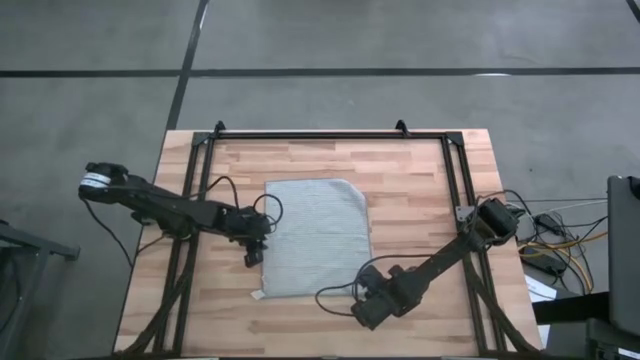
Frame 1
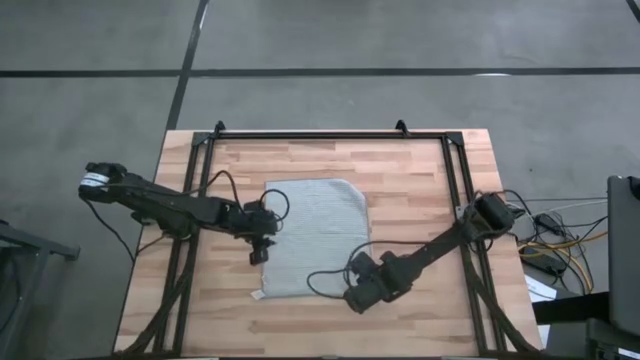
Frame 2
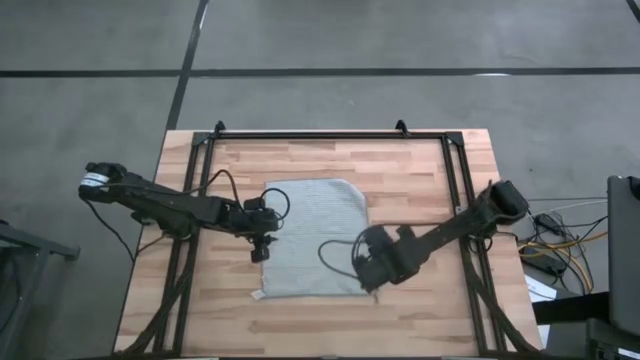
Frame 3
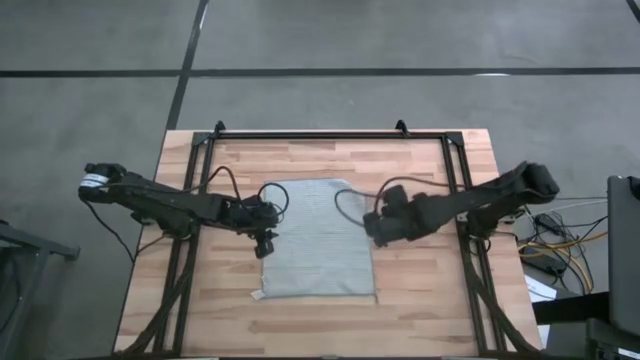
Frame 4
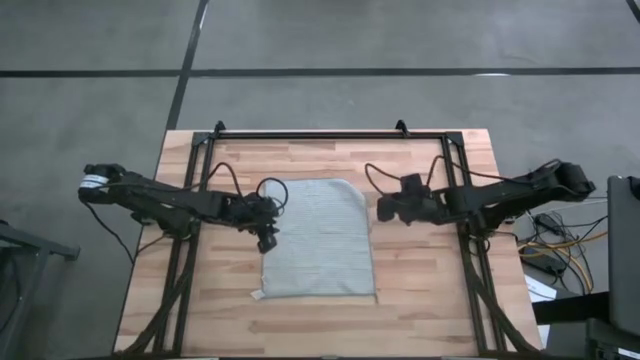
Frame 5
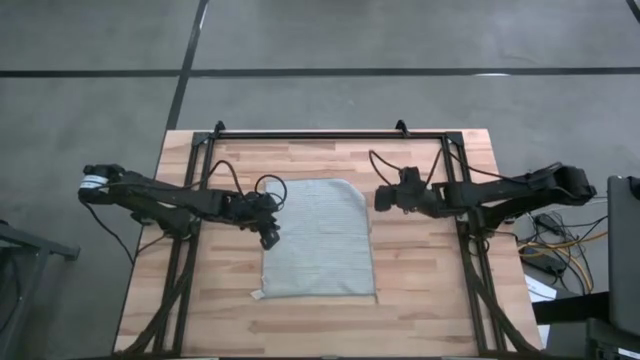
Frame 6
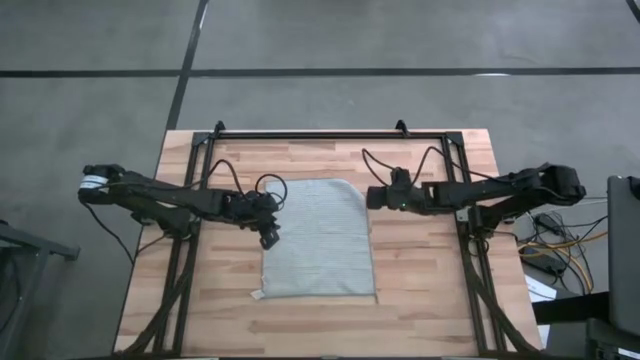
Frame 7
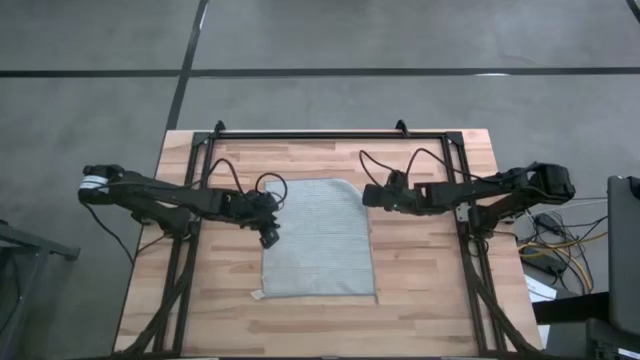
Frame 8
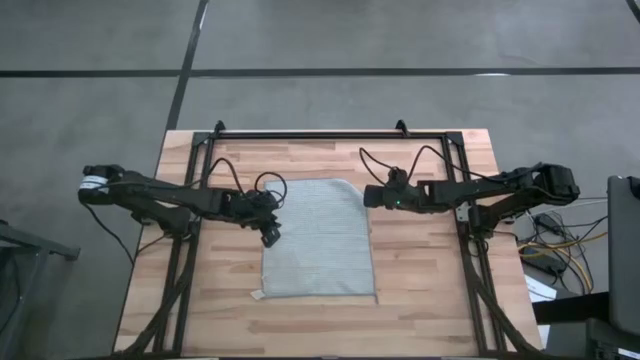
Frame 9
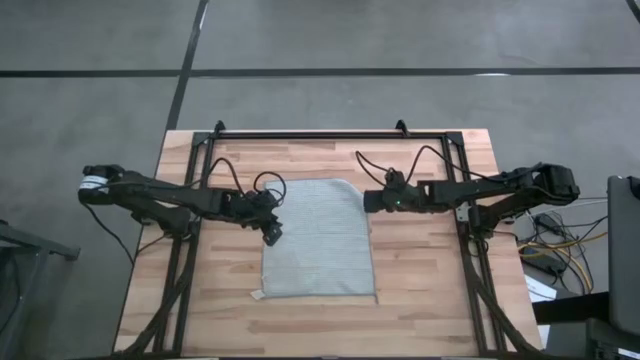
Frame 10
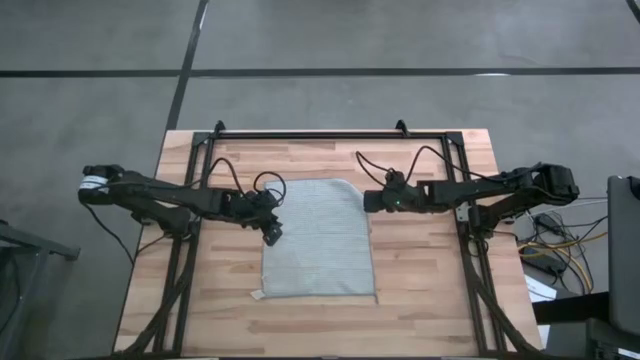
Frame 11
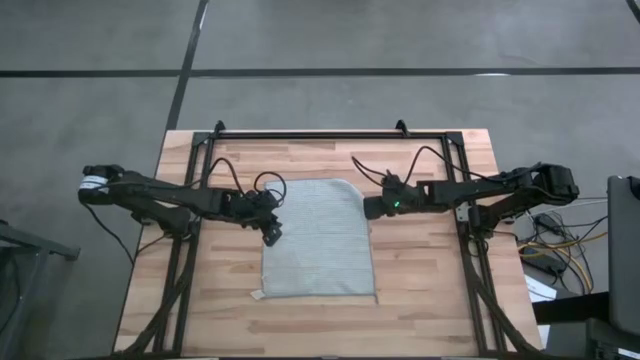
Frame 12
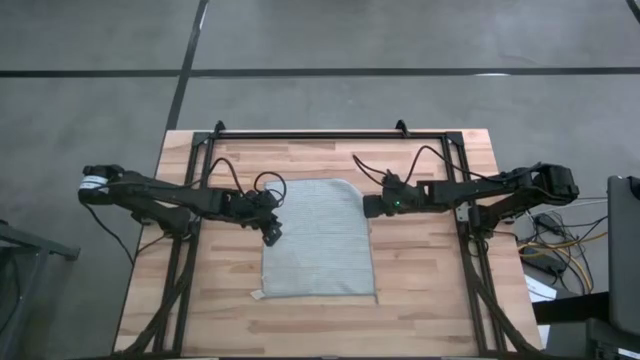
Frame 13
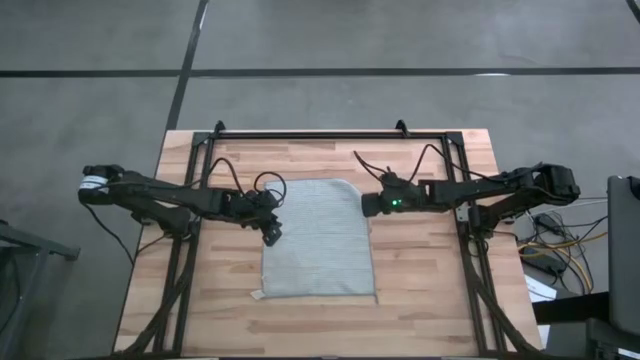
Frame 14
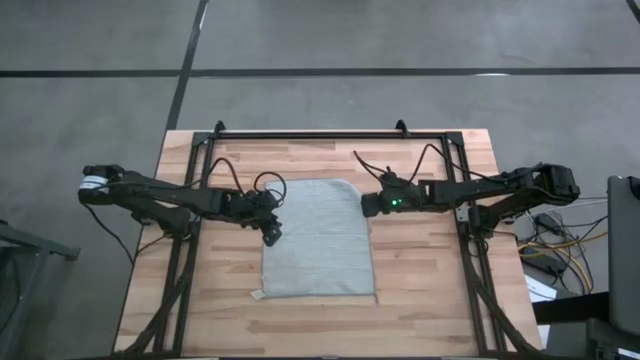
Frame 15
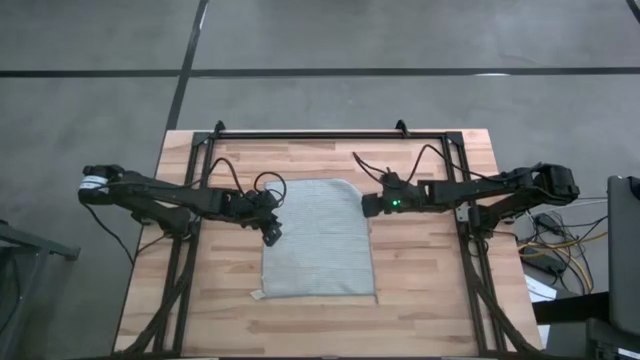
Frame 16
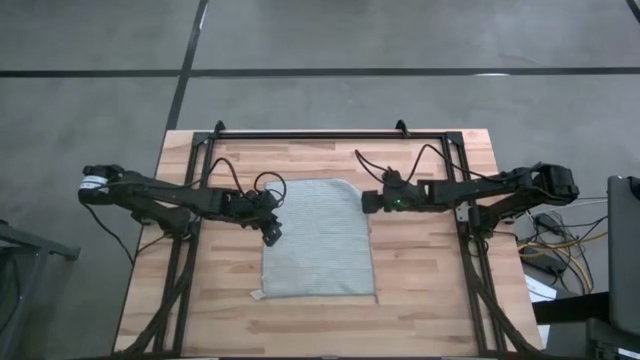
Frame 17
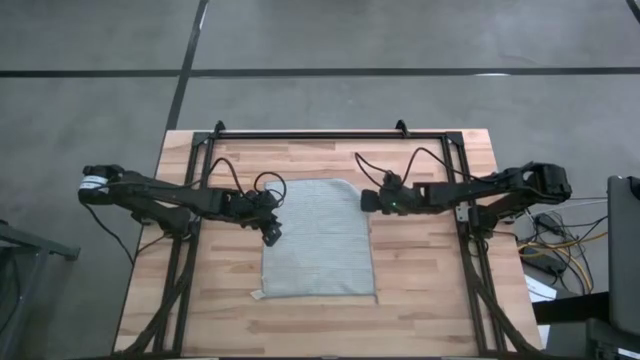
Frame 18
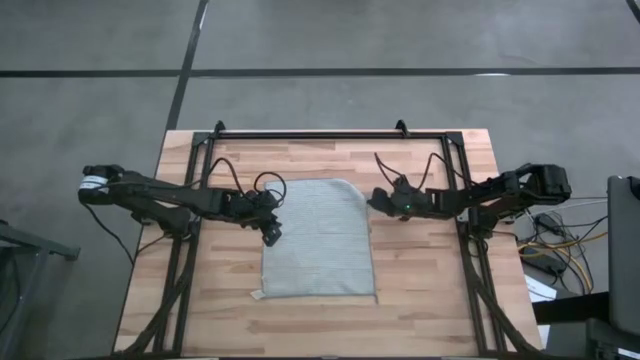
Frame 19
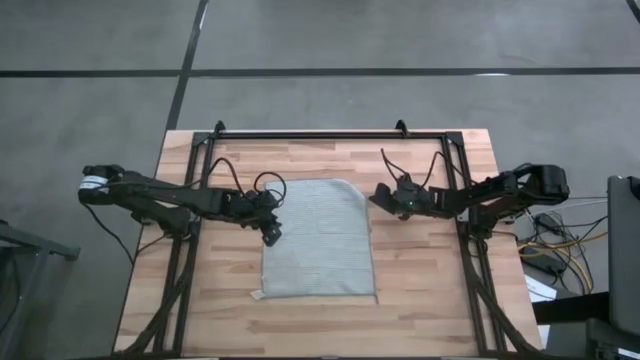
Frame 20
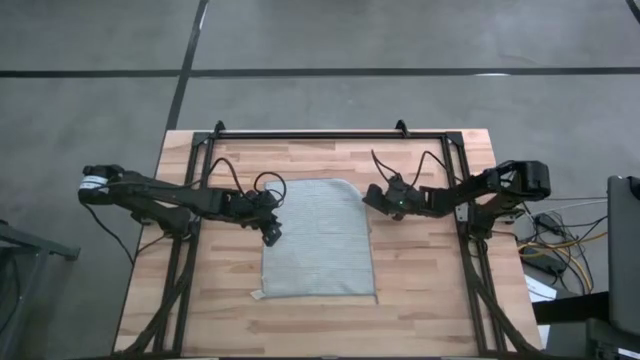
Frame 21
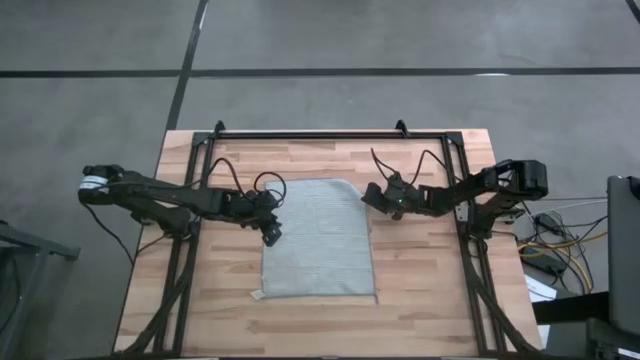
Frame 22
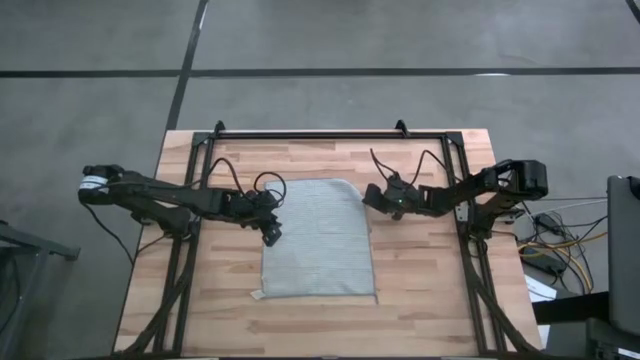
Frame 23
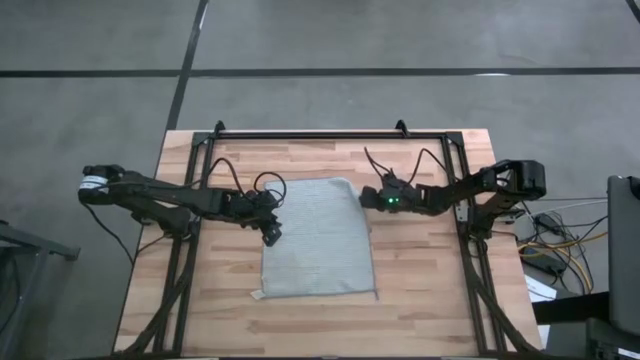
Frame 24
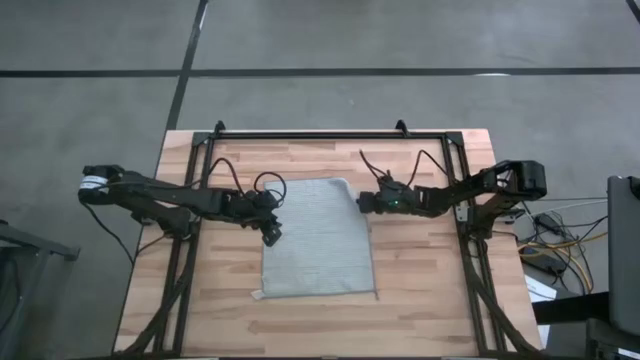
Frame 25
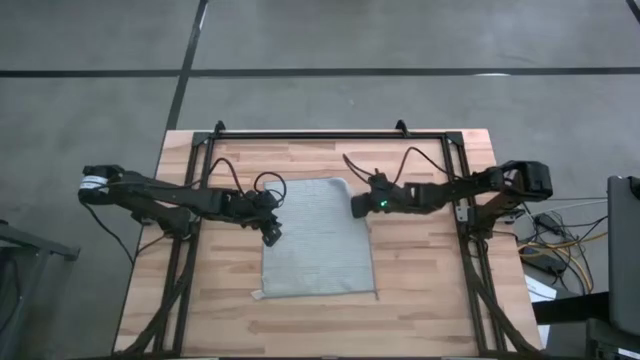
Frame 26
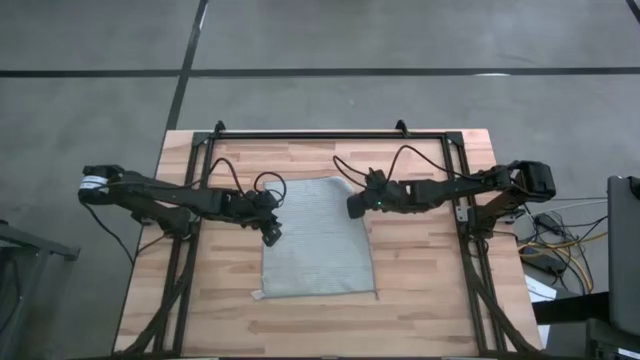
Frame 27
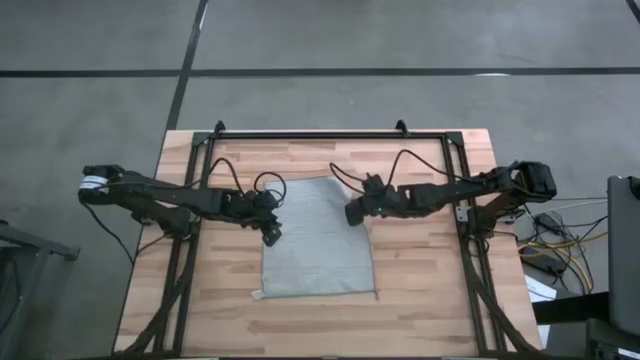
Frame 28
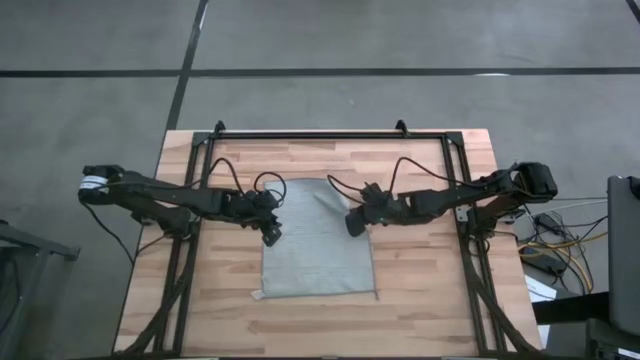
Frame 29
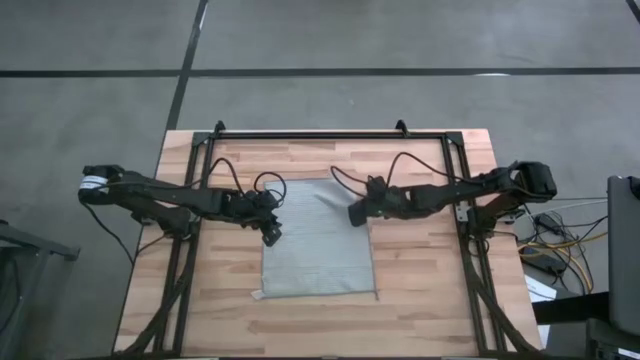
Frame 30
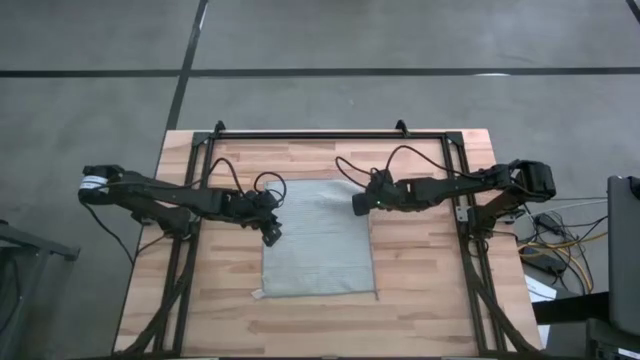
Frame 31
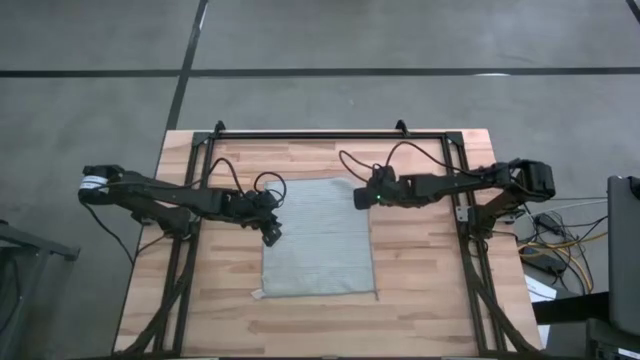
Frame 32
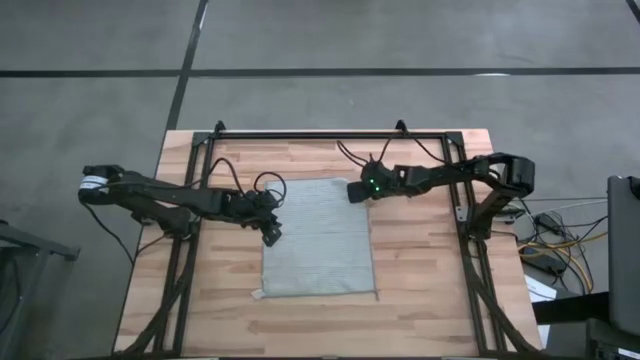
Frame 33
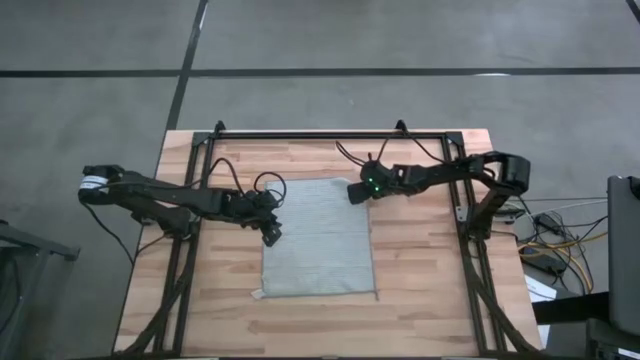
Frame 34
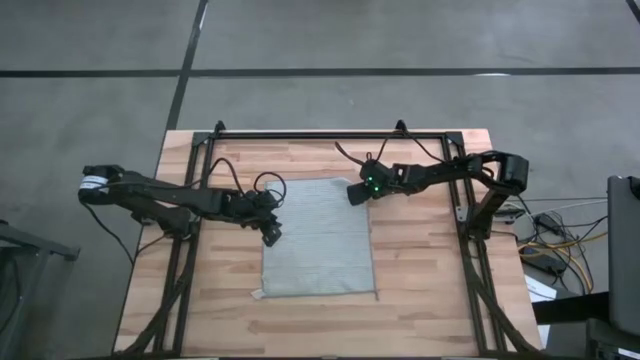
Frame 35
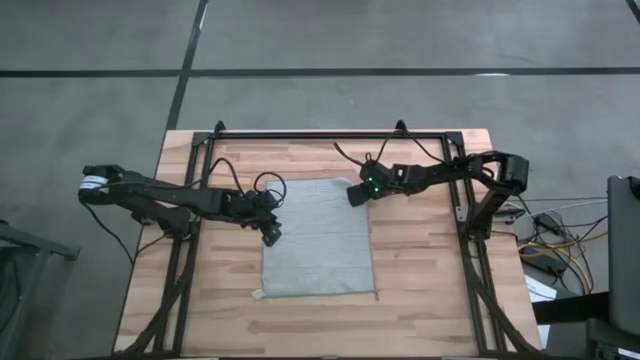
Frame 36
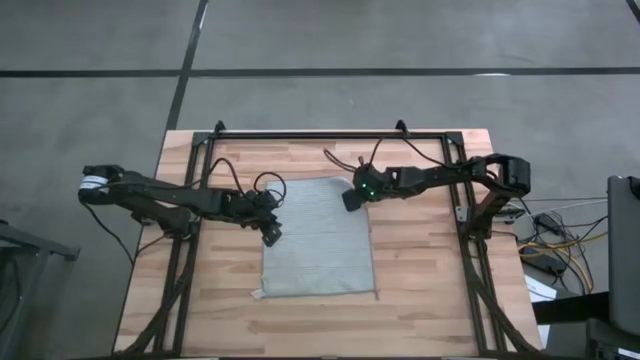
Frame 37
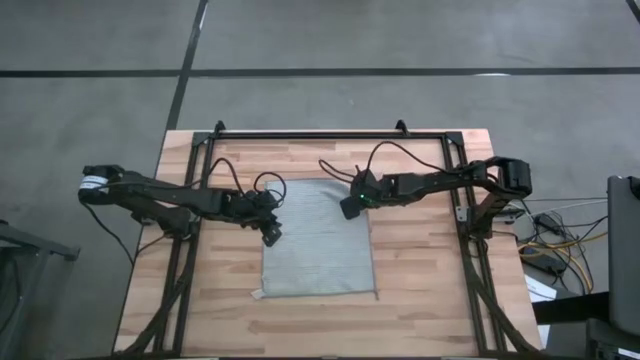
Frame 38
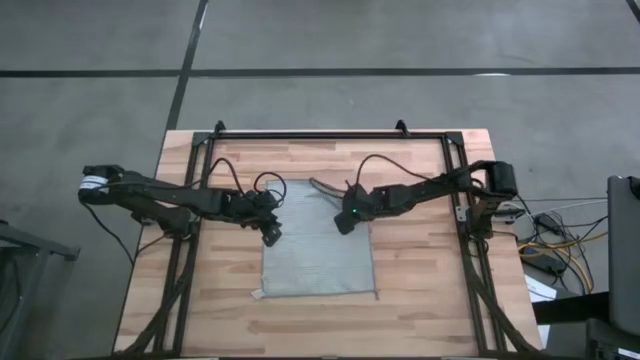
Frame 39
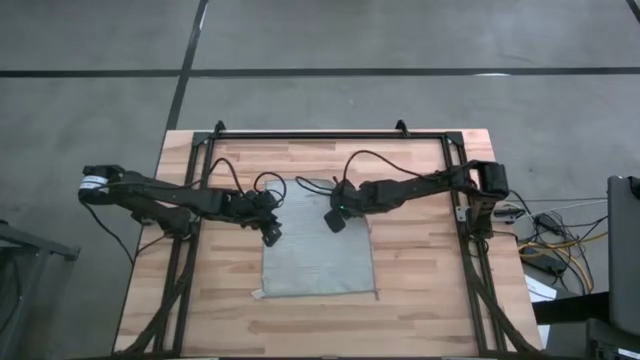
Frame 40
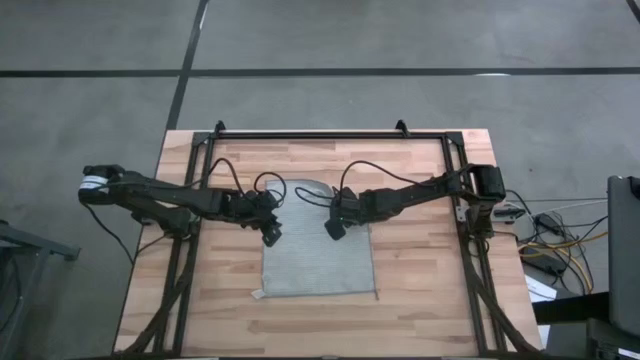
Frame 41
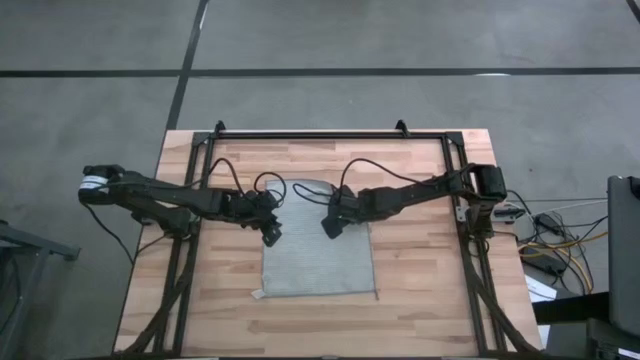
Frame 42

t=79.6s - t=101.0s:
Task: Fold microfiber towels
Fold the microfiber cloth on the table
